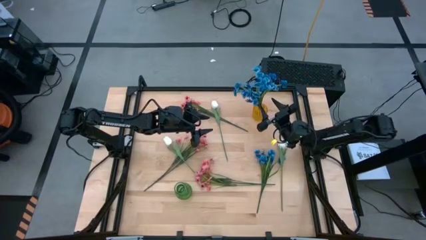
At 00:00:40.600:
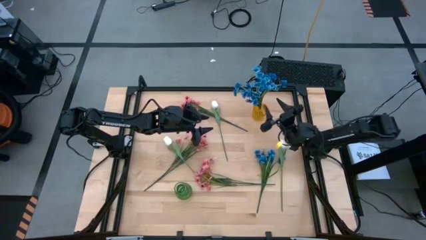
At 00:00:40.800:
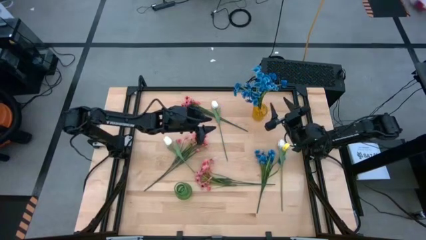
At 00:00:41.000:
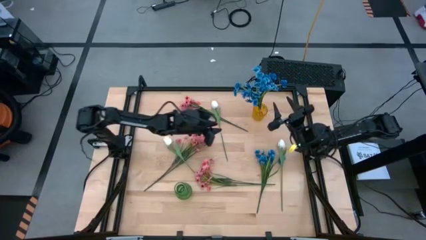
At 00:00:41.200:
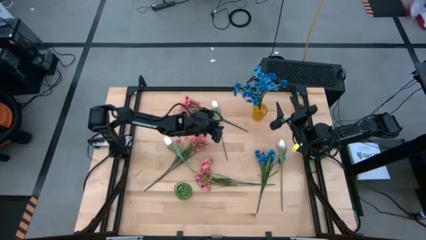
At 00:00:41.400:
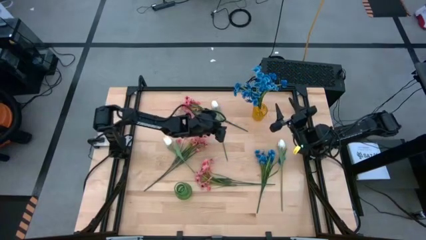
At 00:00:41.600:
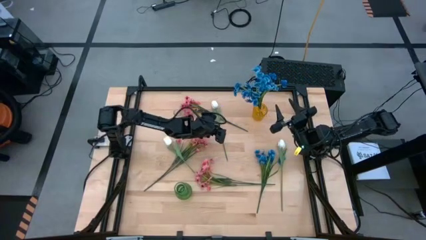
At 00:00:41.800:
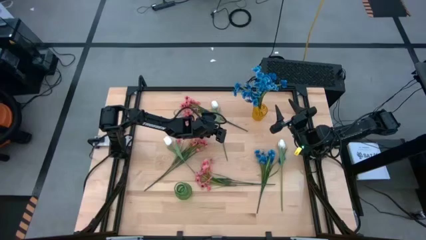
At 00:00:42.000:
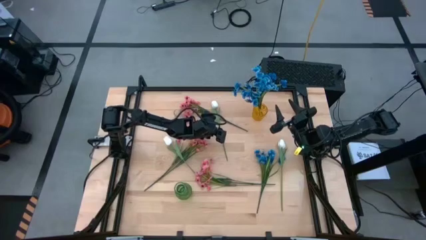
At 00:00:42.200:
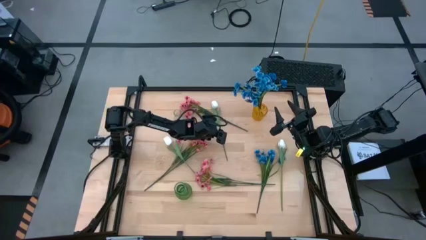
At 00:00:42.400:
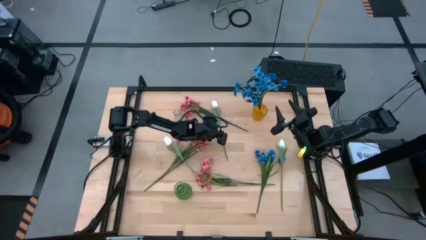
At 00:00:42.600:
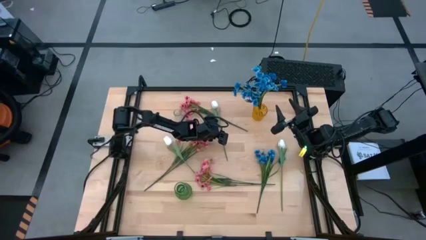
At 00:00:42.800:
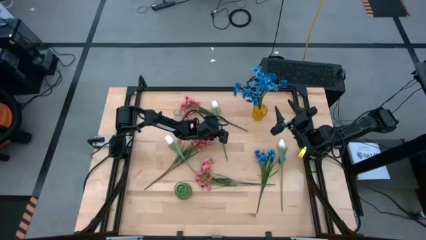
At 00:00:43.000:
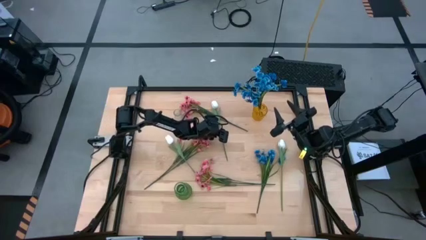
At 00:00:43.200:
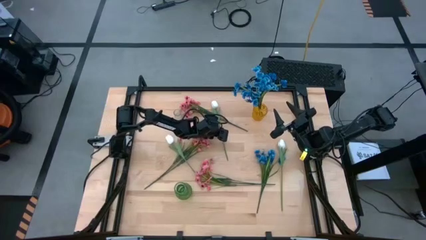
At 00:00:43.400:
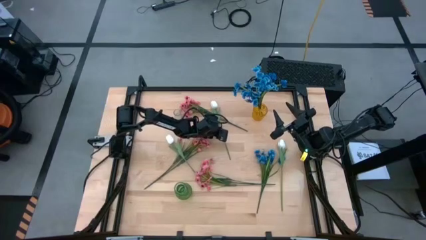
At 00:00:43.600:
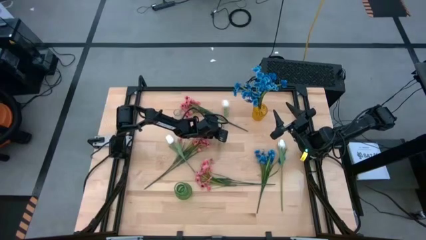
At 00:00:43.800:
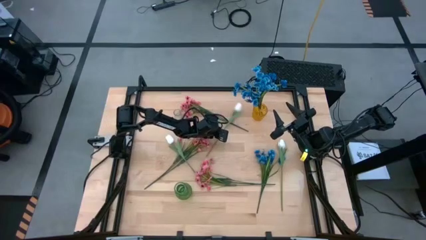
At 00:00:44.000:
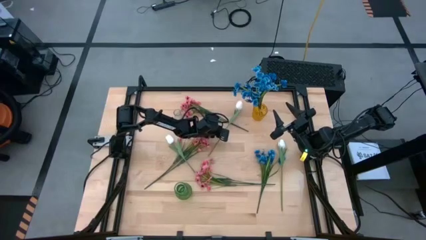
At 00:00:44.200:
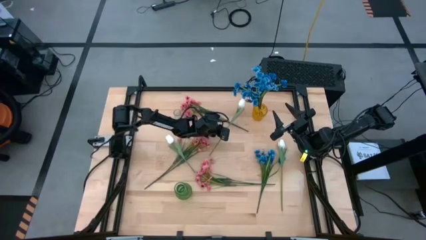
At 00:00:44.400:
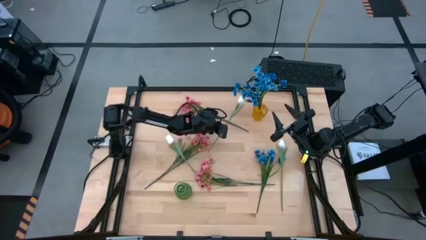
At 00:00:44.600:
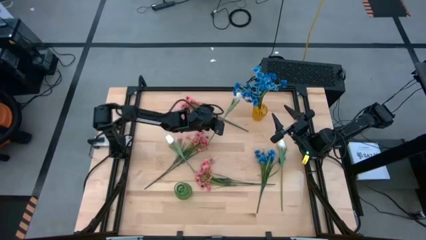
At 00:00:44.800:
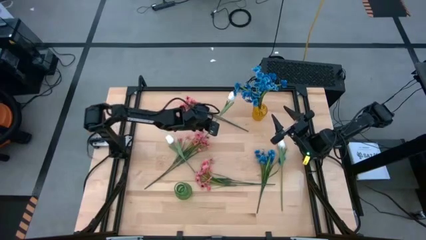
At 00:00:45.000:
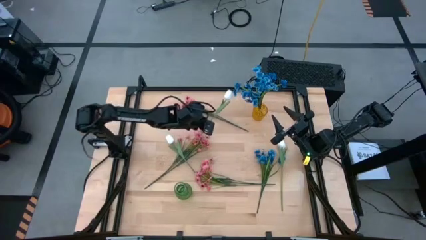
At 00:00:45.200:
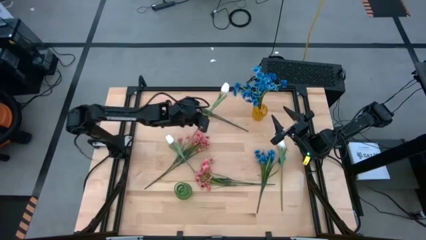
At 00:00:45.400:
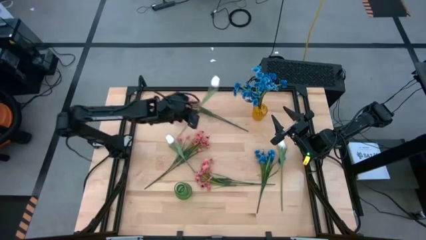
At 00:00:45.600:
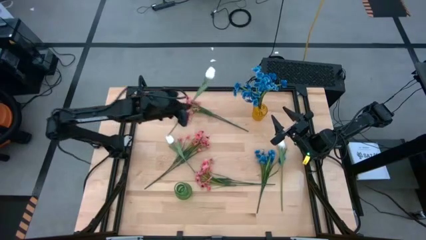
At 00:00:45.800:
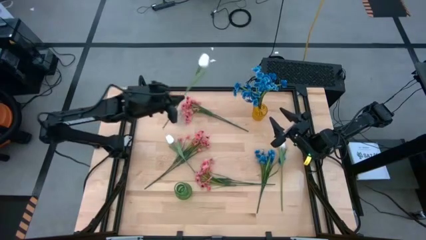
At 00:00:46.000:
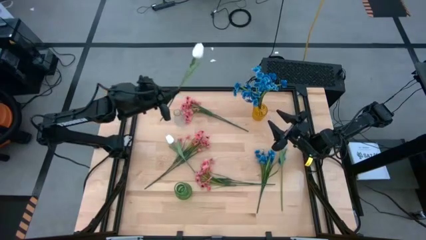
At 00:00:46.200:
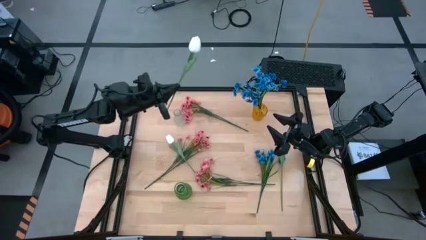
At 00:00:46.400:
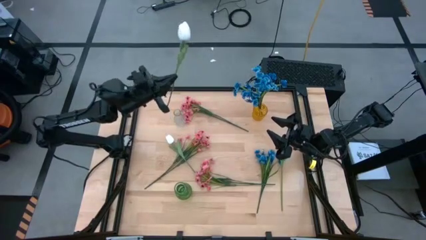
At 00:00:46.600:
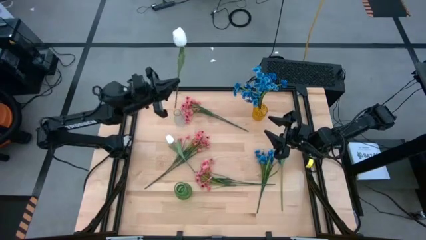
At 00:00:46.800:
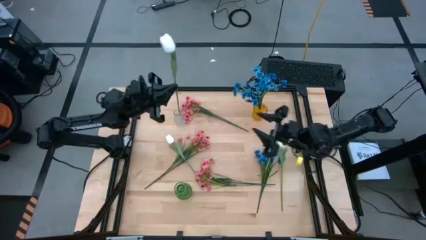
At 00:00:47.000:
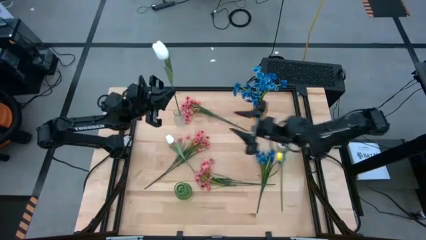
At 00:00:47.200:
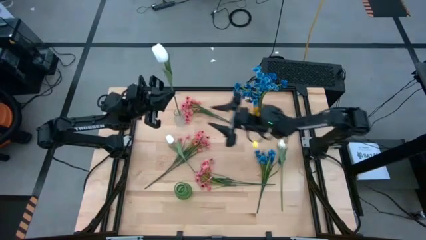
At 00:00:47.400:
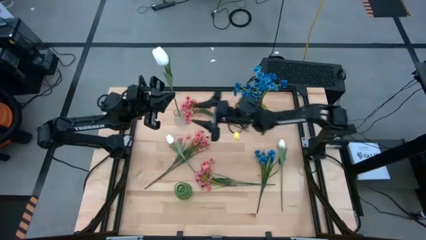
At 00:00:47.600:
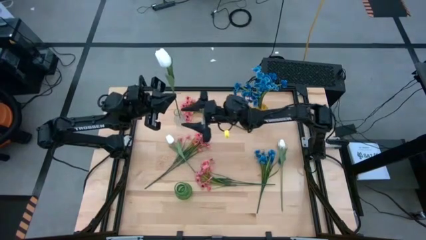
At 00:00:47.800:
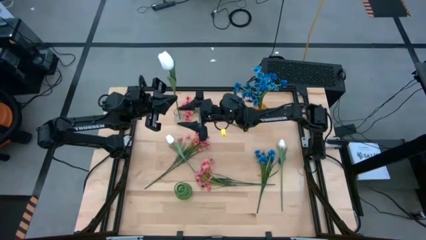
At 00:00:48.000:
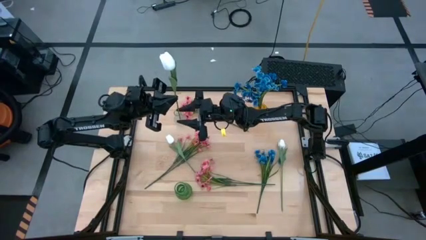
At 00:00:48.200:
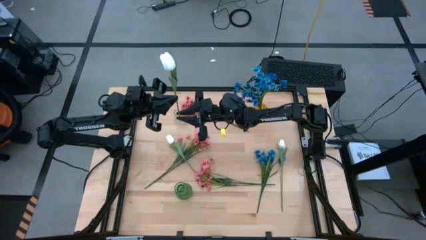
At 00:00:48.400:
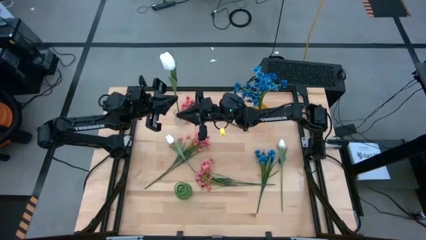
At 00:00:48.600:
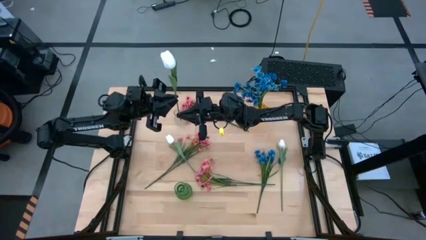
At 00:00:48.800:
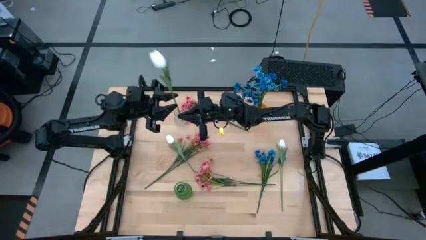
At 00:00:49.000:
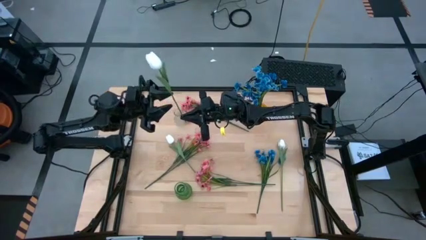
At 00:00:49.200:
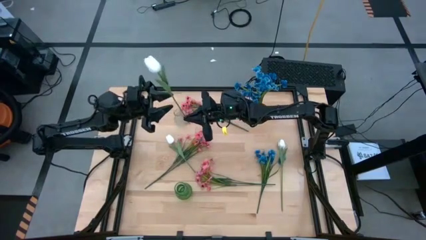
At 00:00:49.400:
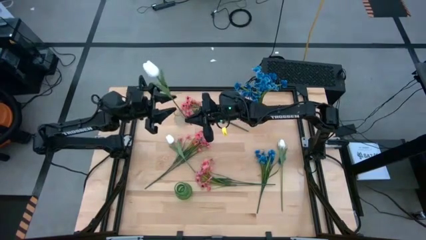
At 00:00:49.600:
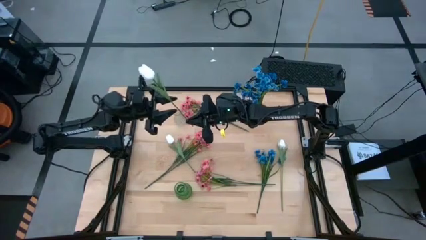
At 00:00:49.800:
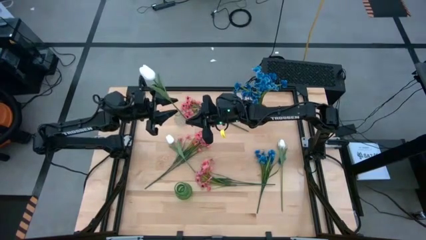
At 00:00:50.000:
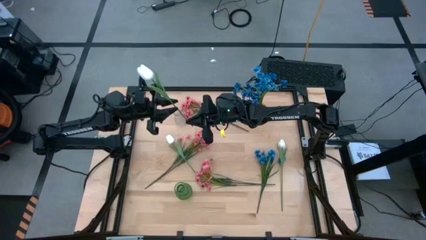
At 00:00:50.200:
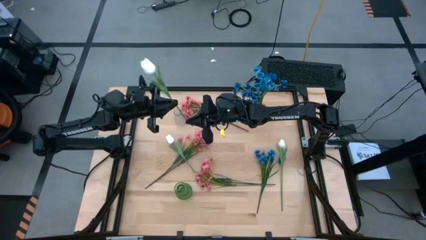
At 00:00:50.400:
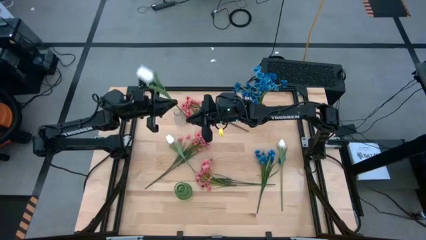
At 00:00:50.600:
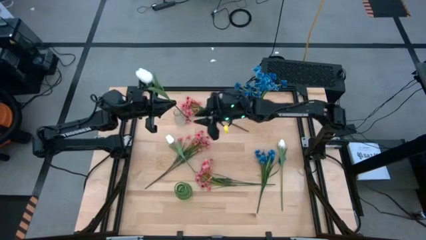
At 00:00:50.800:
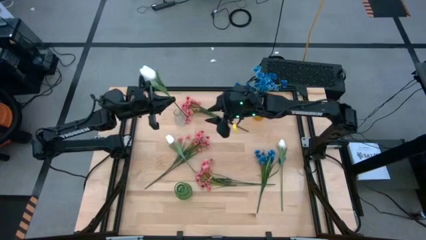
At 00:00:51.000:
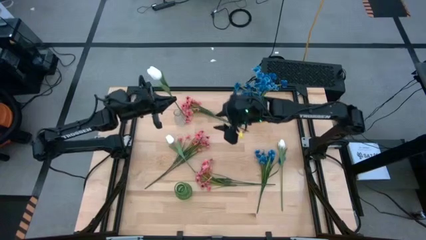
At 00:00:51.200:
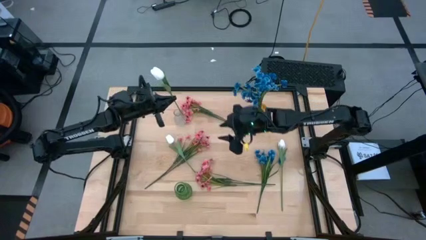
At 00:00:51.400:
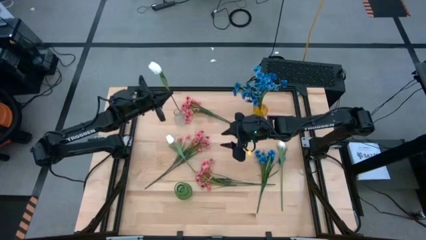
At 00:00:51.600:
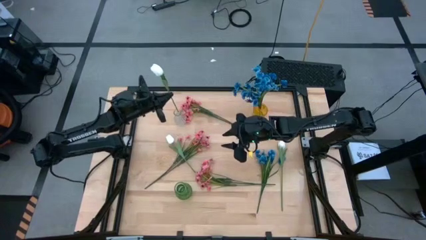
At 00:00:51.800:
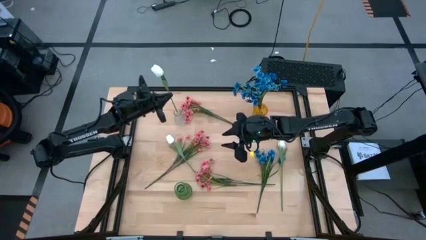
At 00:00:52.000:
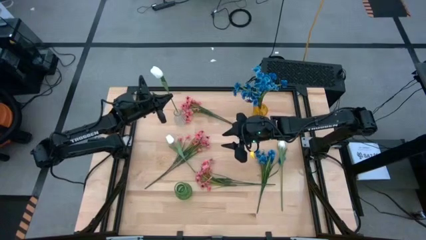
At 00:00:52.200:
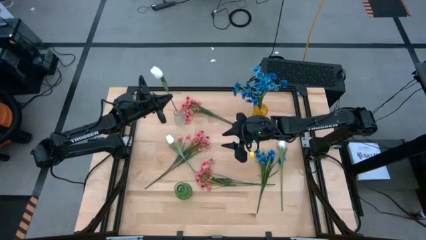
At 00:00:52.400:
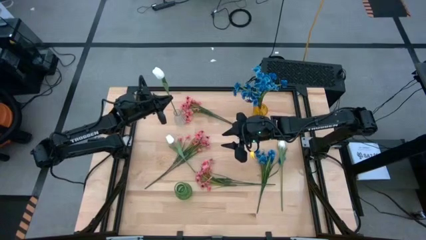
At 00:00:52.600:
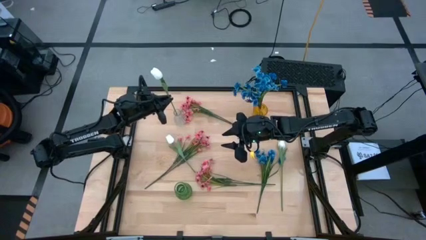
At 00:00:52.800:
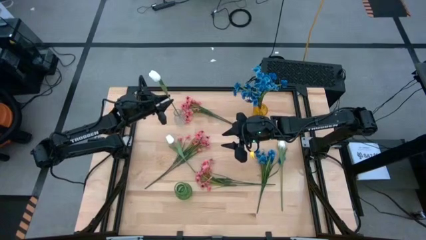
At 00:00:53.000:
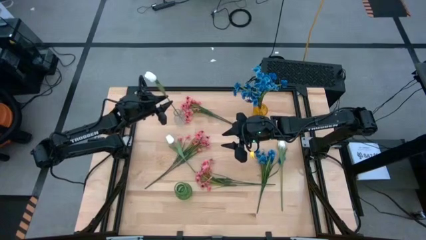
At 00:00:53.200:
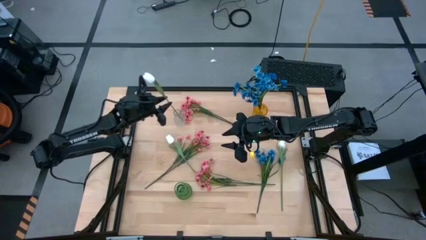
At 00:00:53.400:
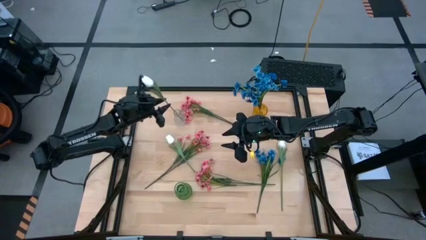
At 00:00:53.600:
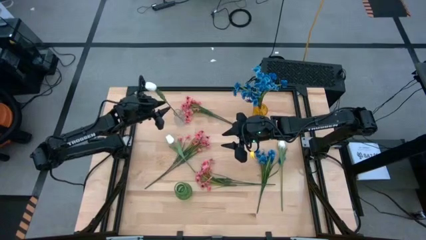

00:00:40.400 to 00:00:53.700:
Task: Sort flowers into vase by color
Put the top white flower into the transparent vase
